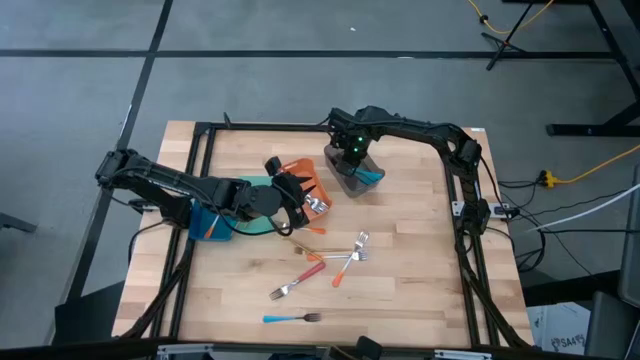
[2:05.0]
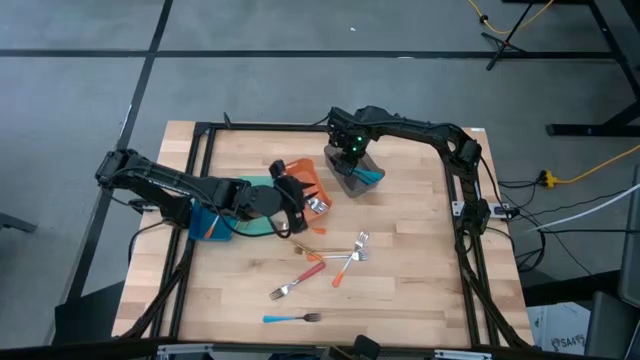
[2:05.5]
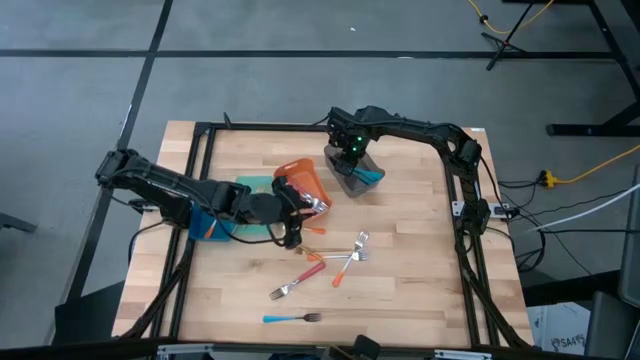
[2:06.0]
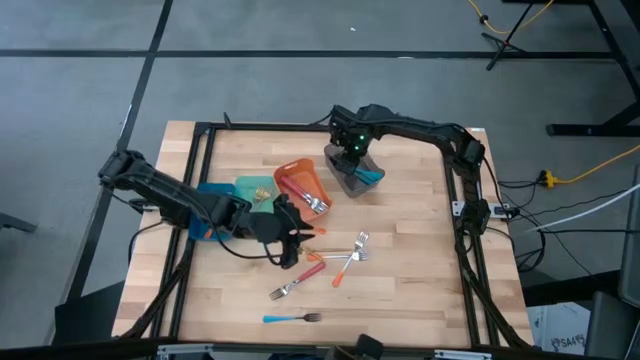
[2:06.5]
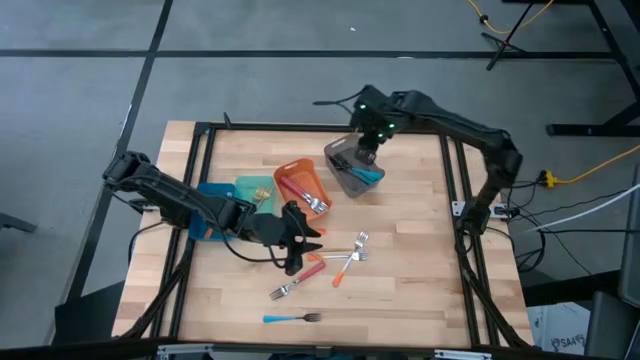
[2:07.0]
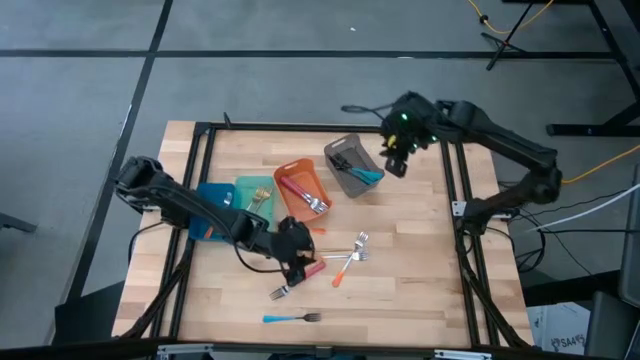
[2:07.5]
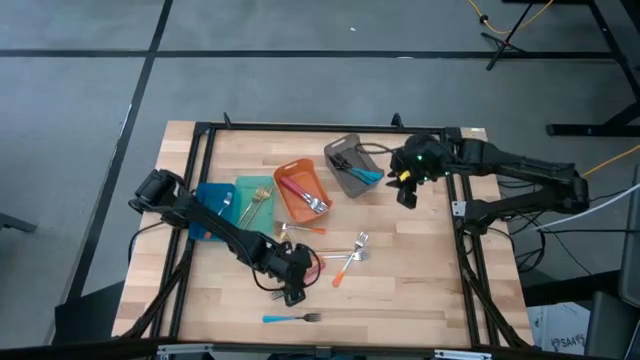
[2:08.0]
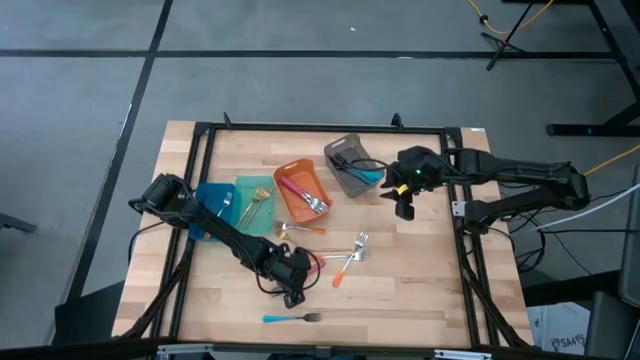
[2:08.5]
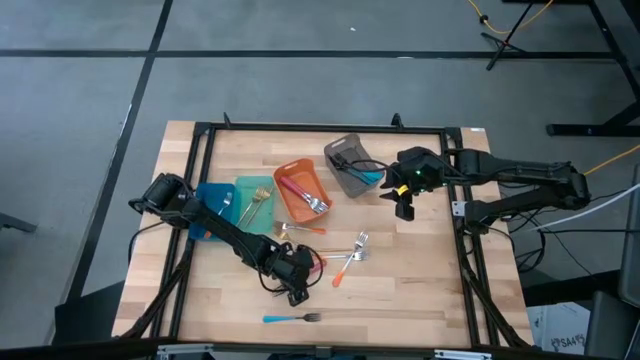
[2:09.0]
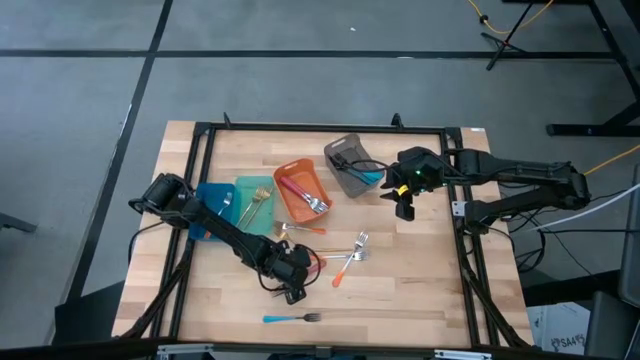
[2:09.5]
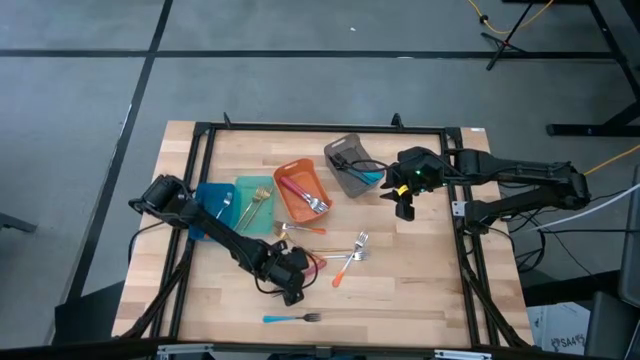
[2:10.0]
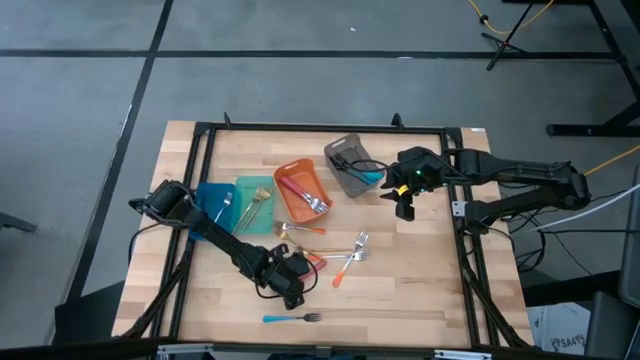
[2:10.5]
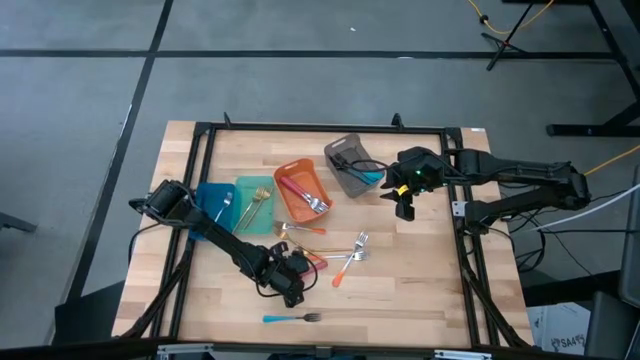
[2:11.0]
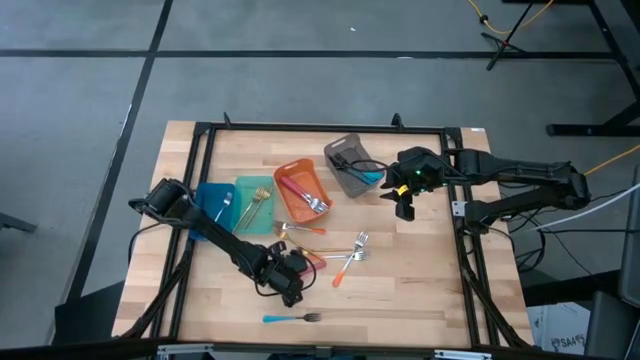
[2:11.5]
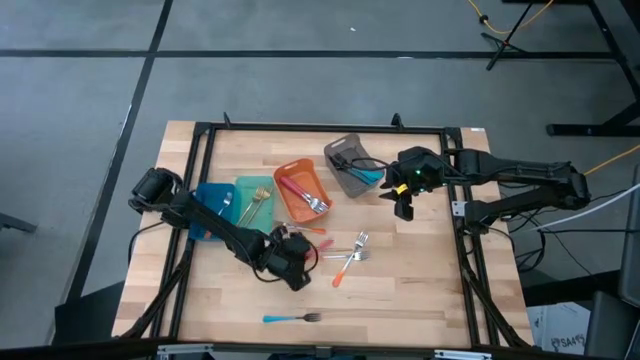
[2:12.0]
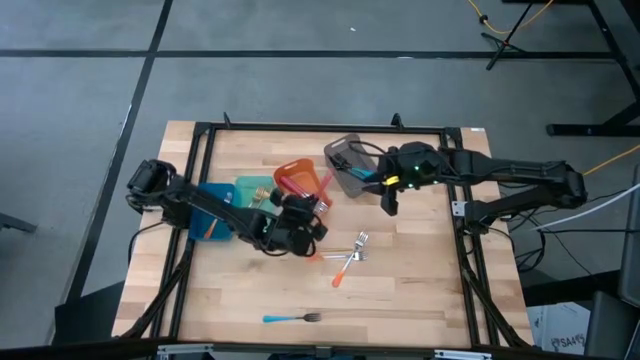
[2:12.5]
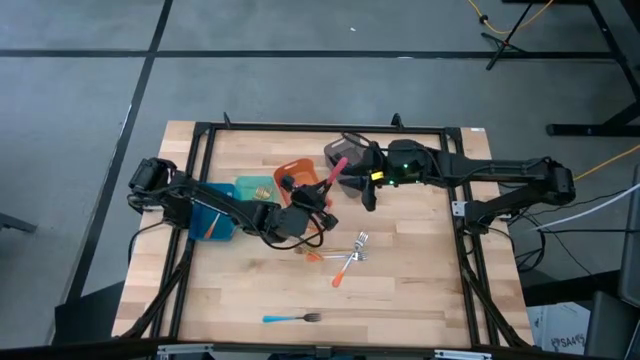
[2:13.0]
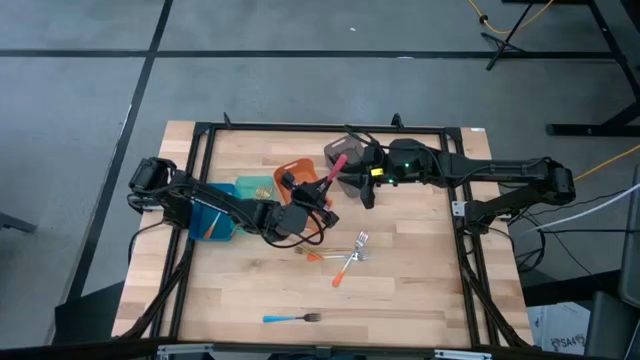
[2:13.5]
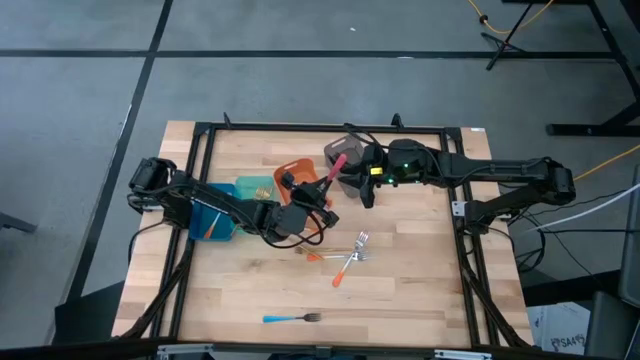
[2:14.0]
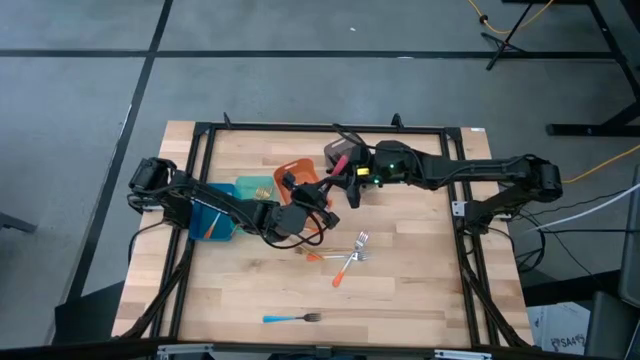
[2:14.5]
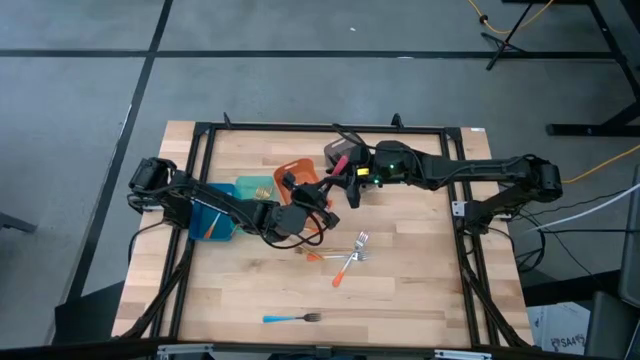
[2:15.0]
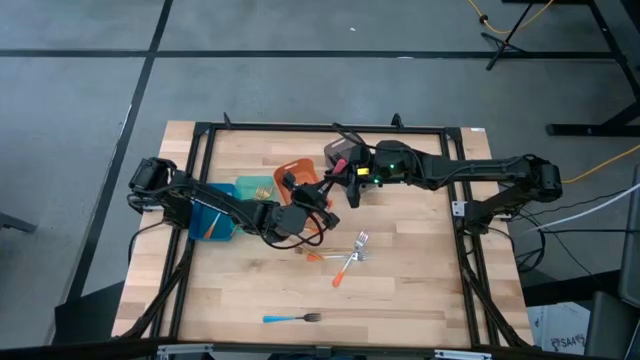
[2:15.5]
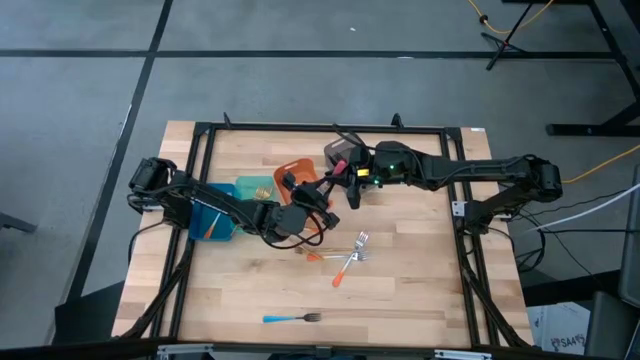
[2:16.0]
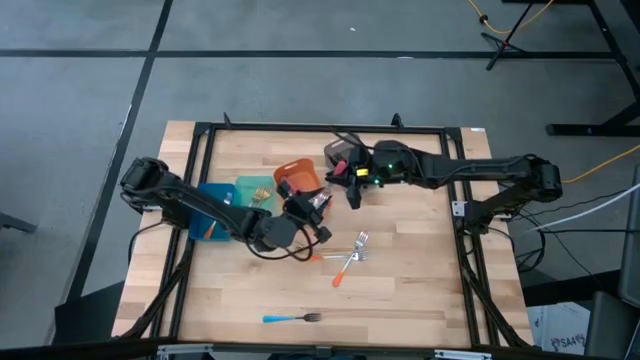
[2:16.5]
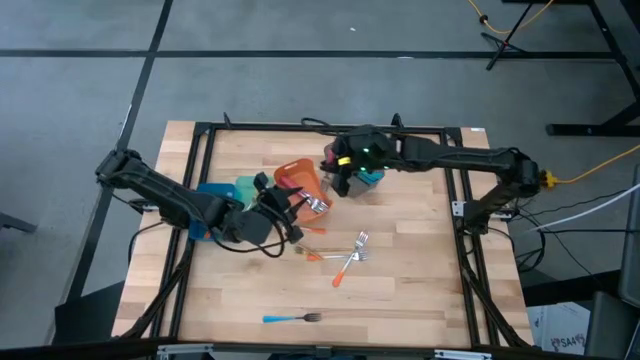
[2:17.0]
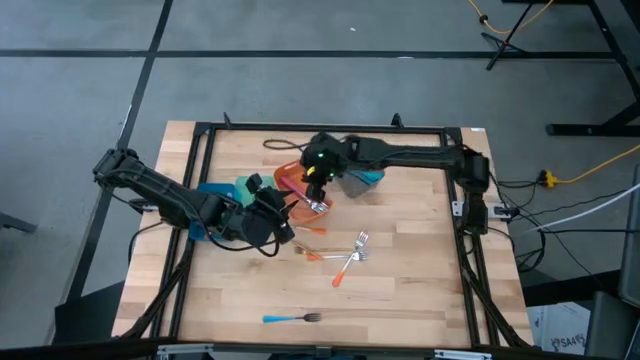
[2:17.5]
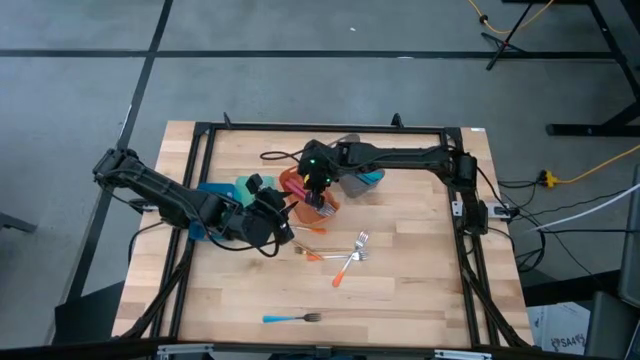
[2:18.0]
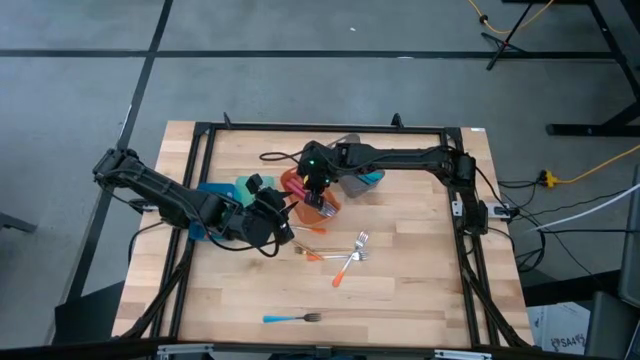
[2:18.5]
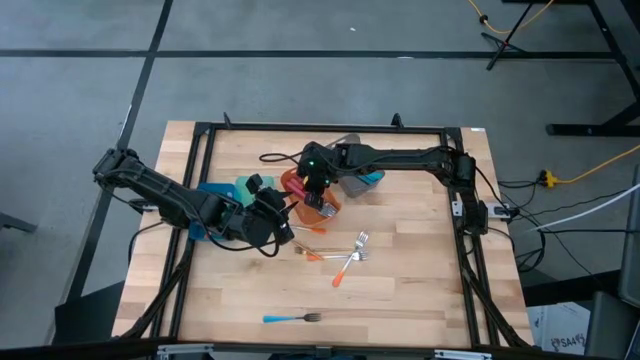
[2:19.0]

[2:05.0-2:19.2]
Task: Sort silverware by color (type)
Put the pink fork into the orange bin

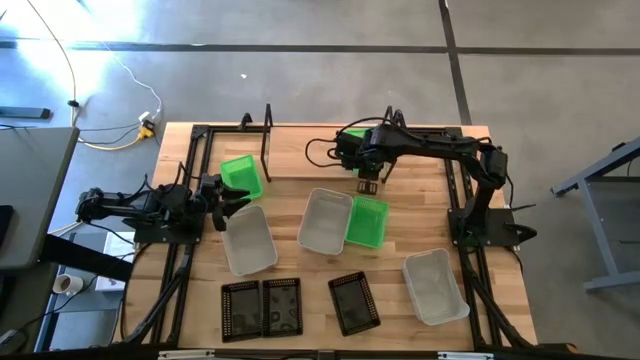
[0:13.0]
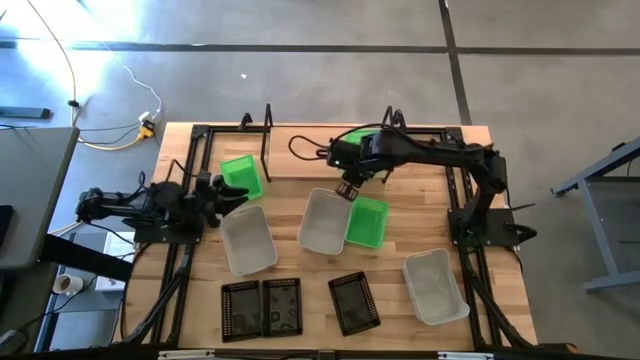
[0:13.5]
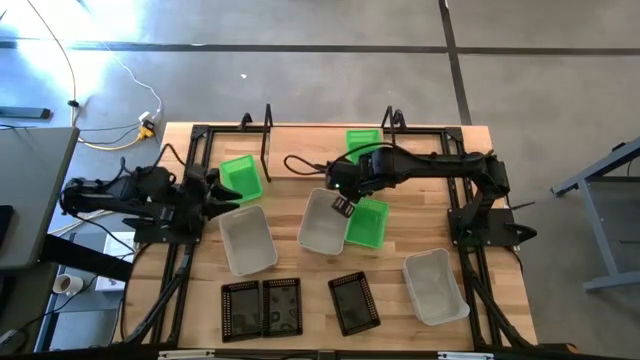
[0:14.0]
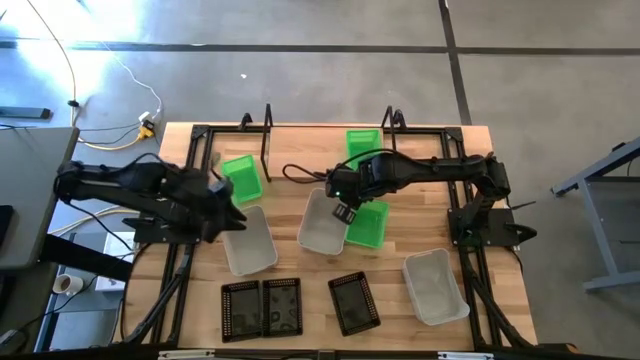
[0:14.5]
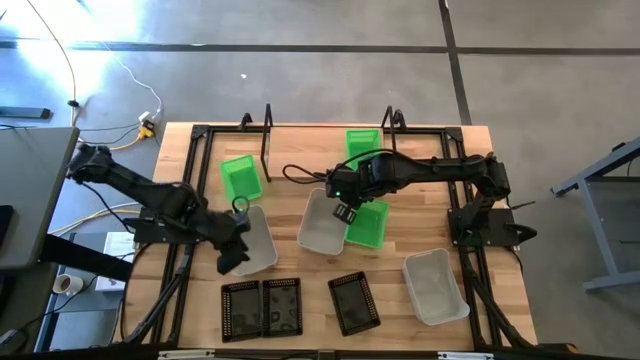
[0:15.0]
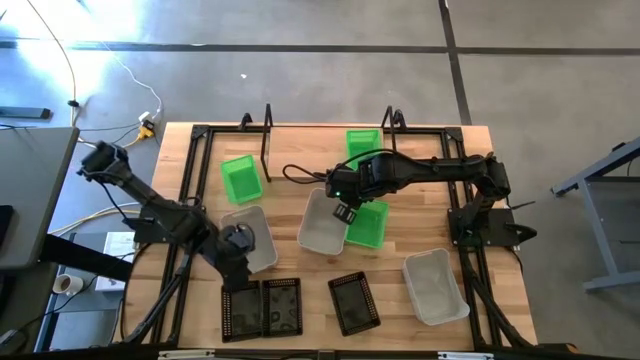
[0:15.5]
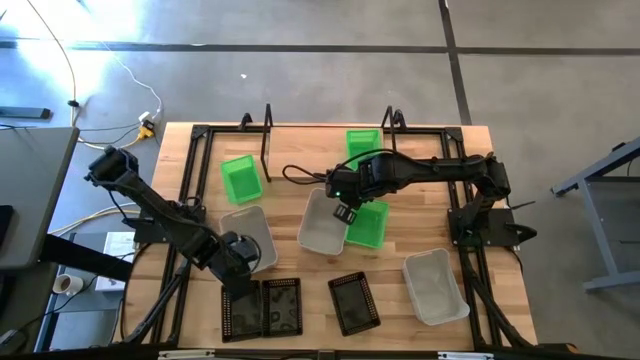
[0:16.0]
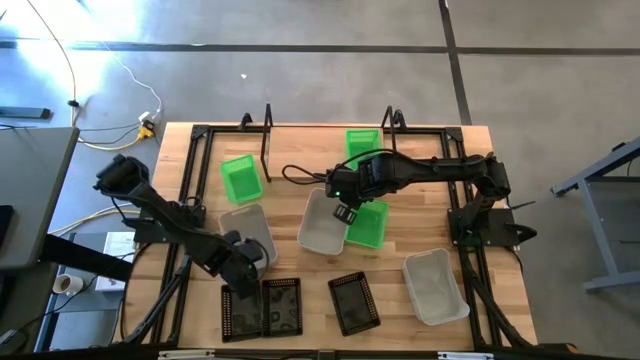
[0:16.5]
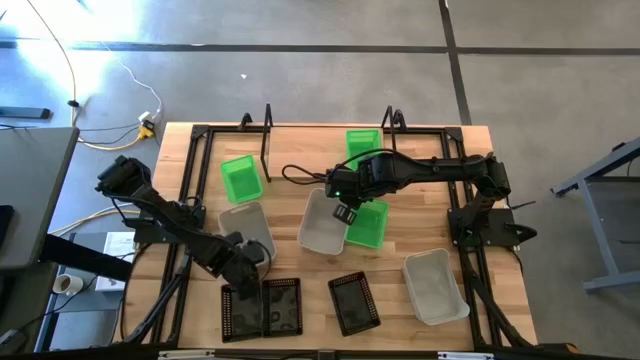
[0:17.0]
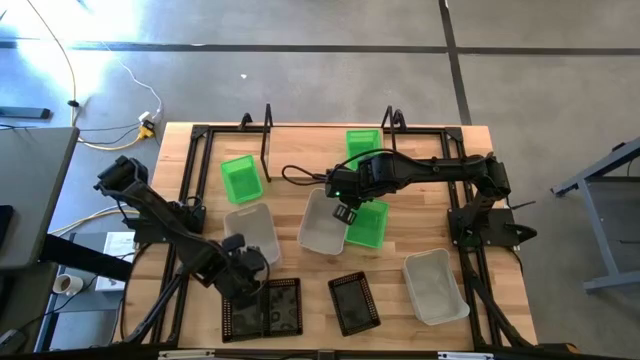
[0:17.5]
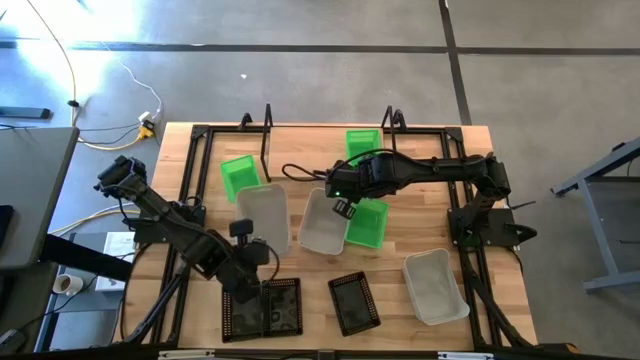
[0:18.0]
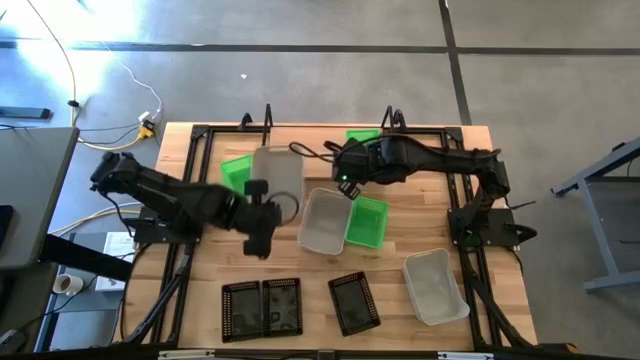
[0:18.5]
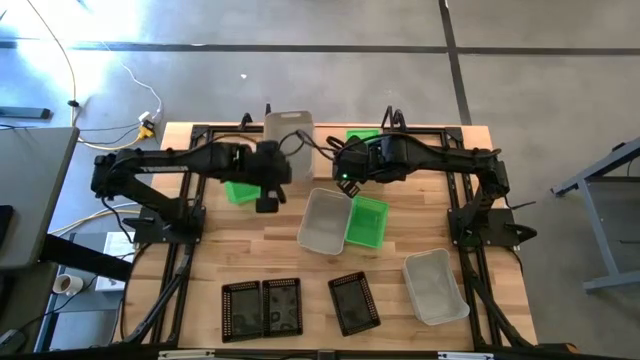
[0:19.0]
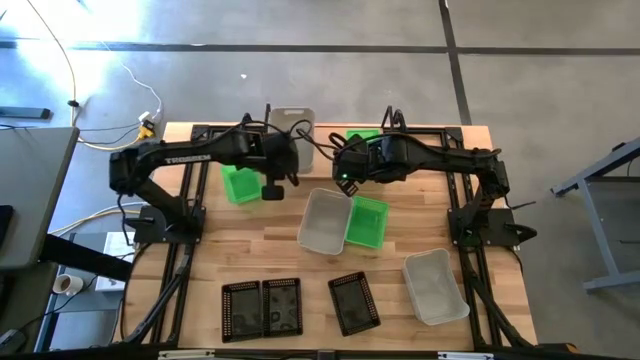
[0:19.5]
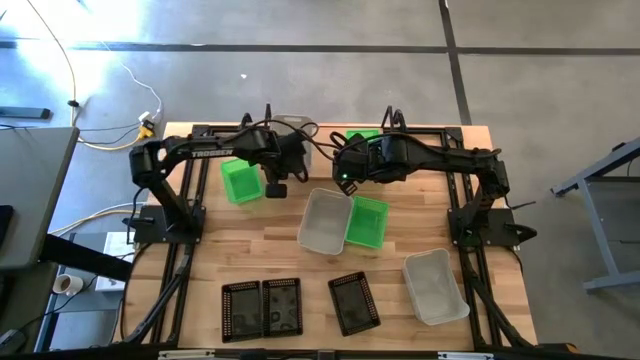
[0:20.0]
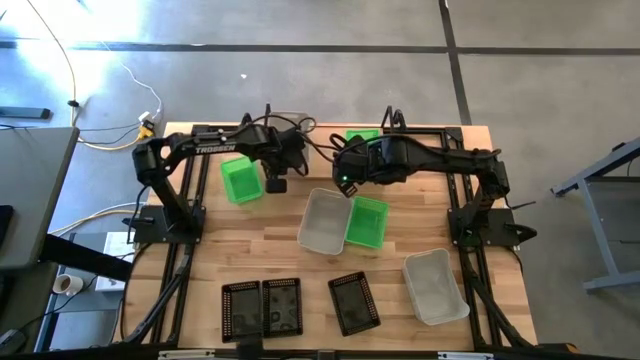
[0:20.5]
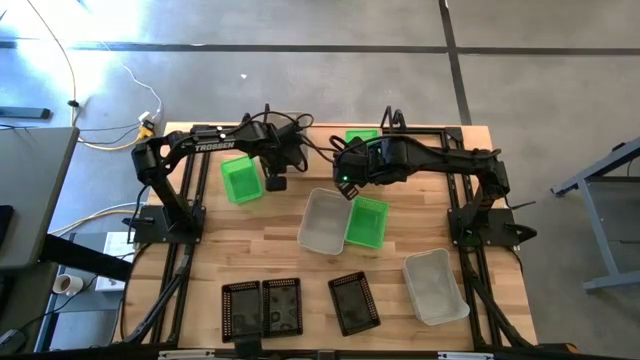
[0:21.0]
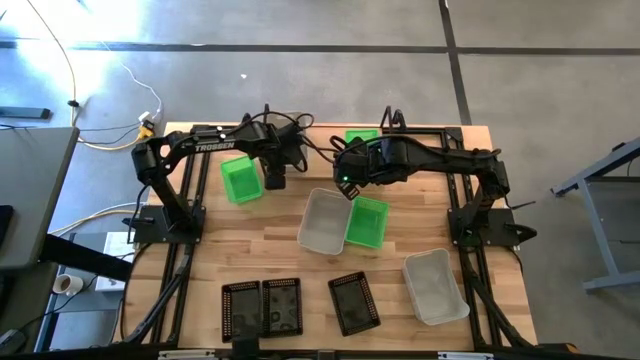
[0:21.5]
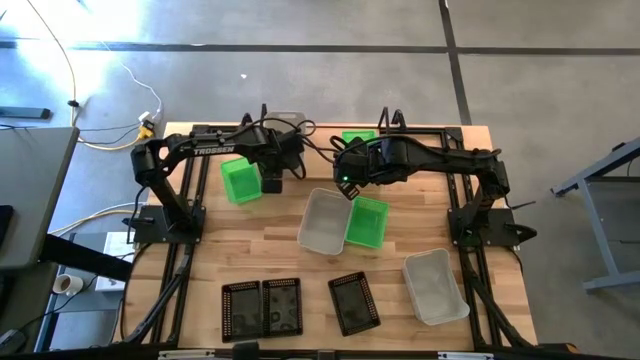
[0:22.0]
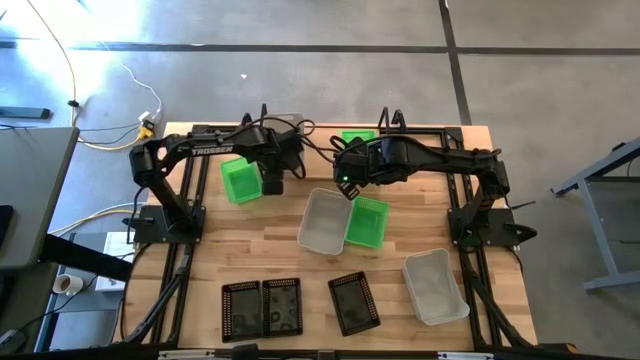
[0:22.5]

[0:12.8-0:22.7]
Task: Stack baskets on shelf by color
Put the top left gray bin on the shelf
